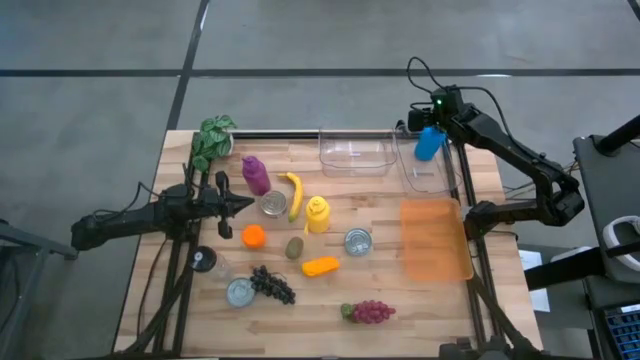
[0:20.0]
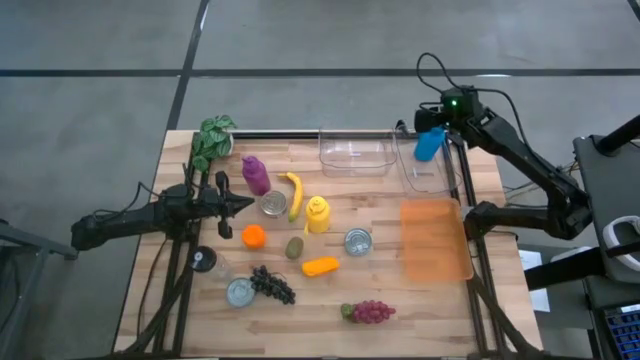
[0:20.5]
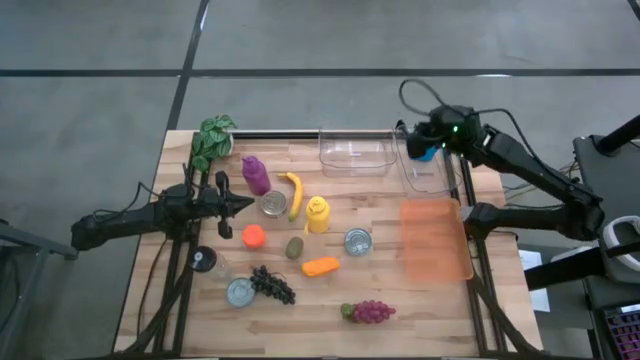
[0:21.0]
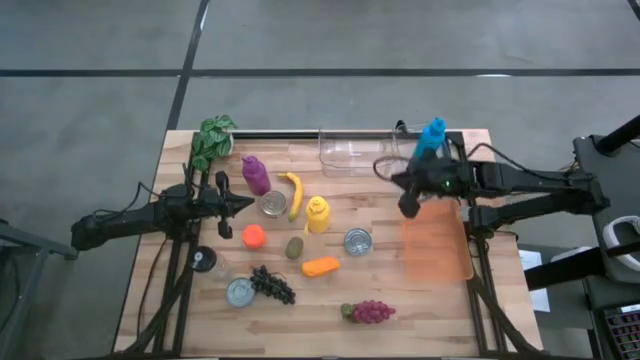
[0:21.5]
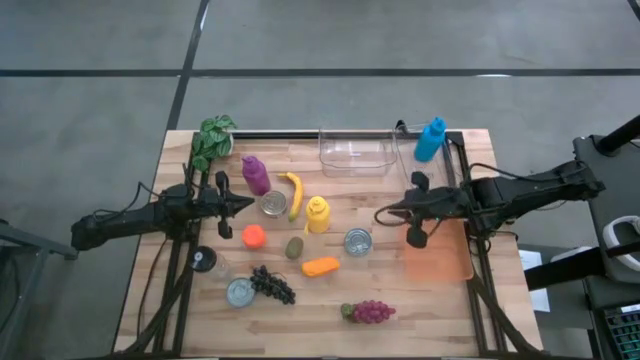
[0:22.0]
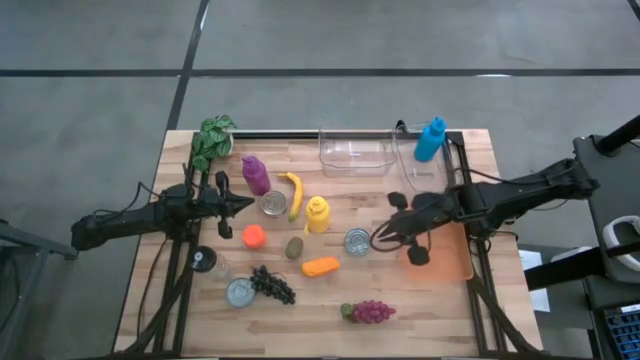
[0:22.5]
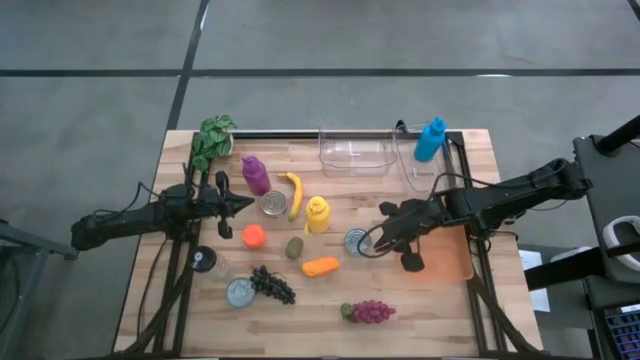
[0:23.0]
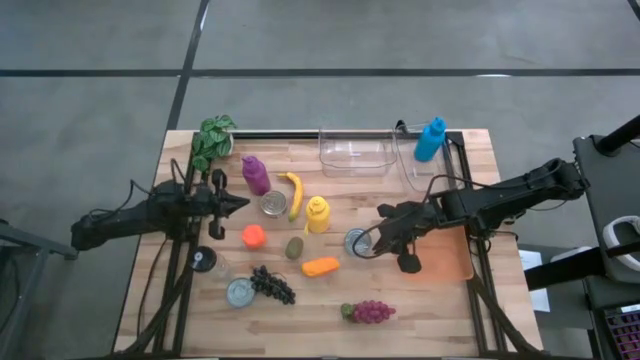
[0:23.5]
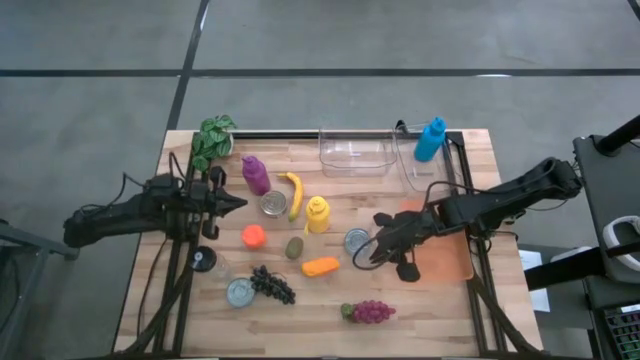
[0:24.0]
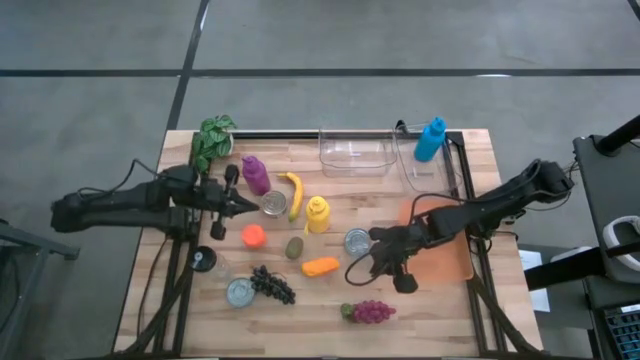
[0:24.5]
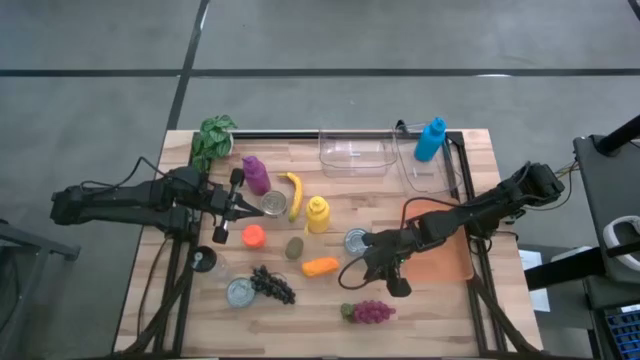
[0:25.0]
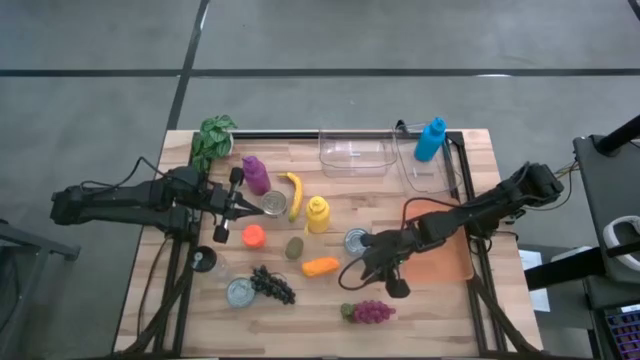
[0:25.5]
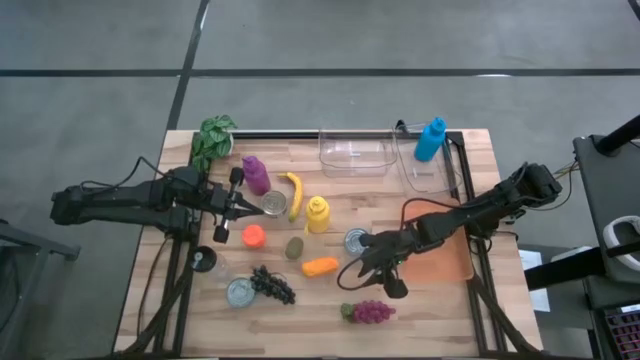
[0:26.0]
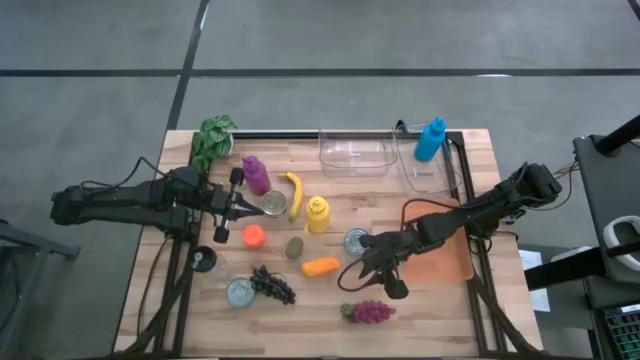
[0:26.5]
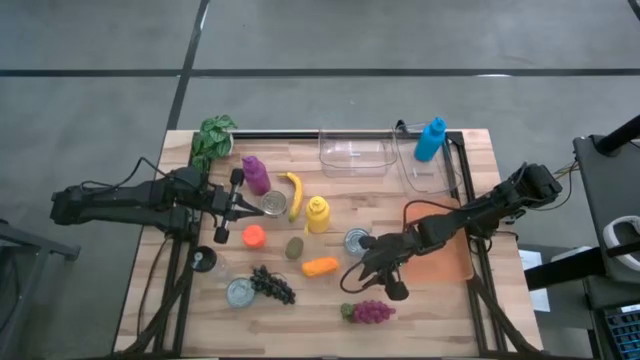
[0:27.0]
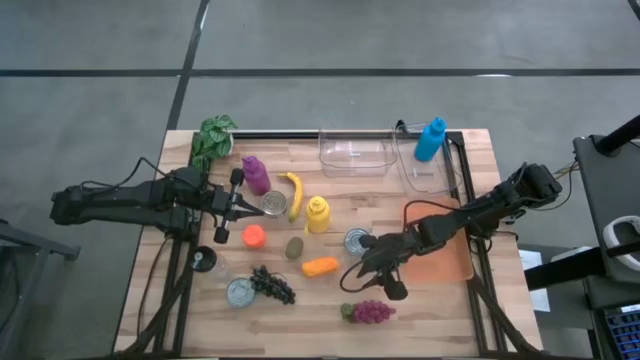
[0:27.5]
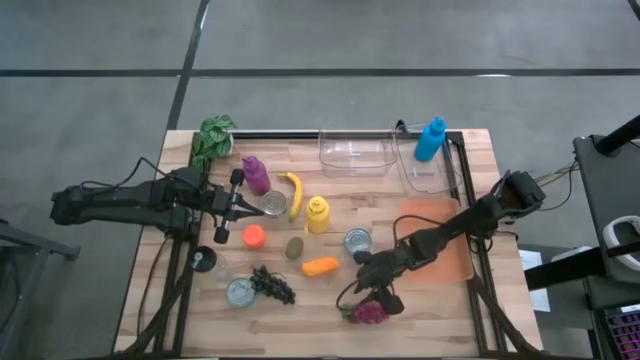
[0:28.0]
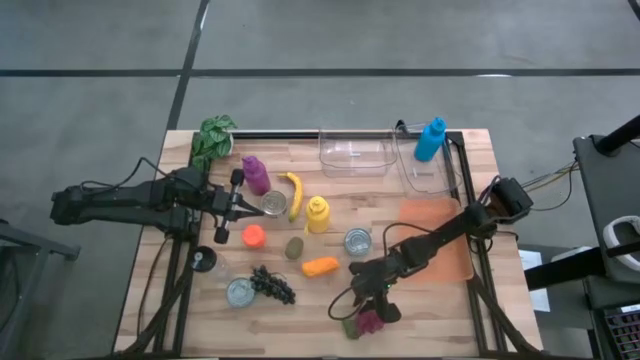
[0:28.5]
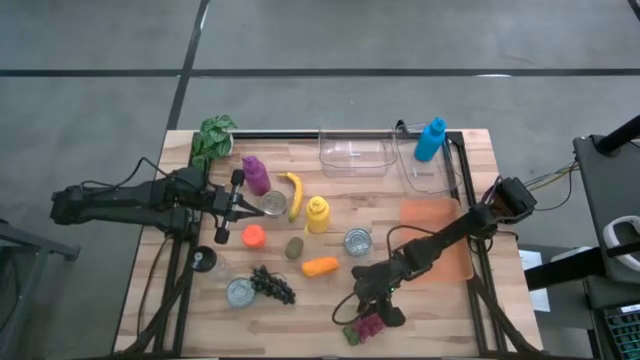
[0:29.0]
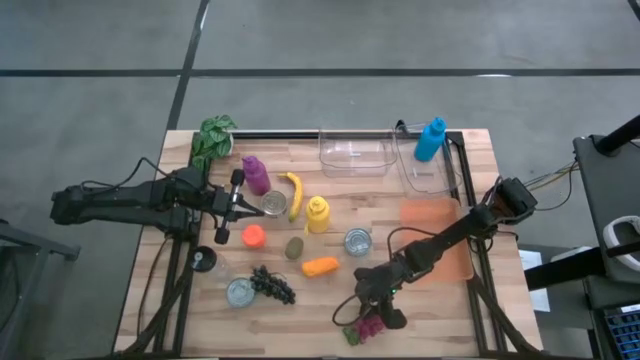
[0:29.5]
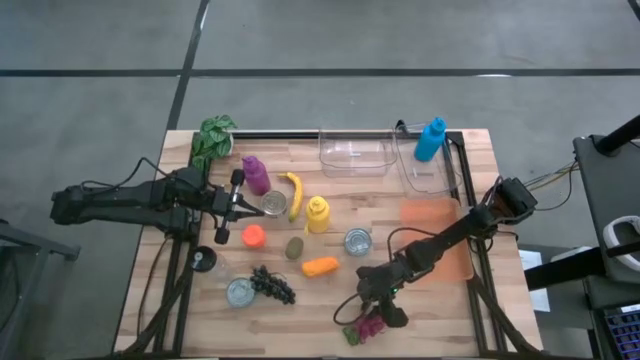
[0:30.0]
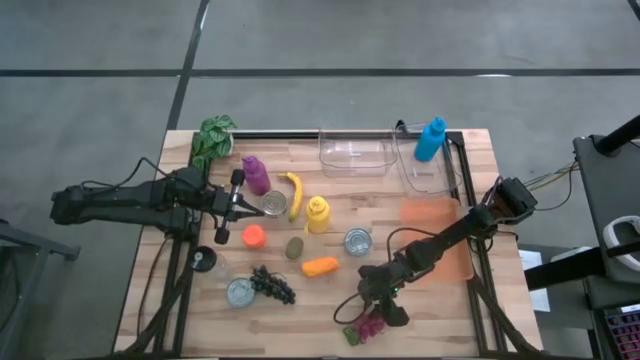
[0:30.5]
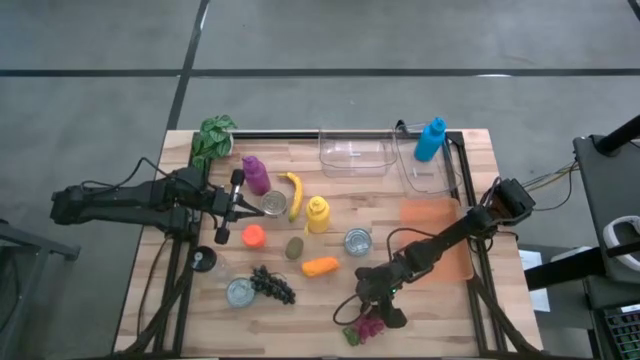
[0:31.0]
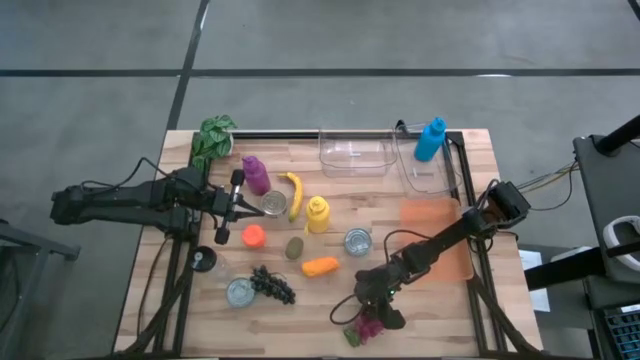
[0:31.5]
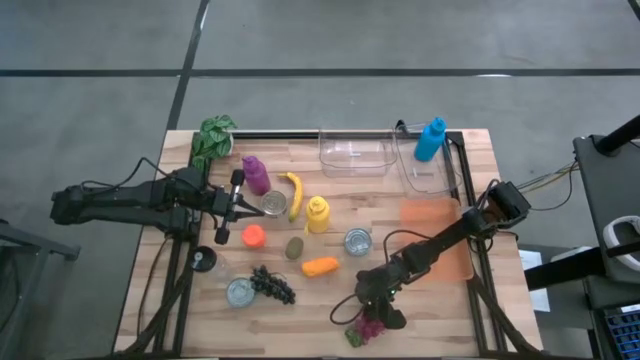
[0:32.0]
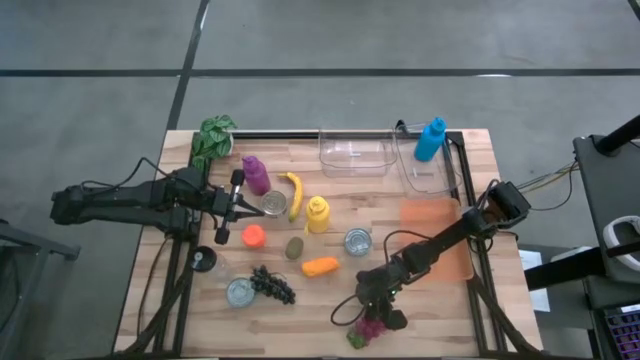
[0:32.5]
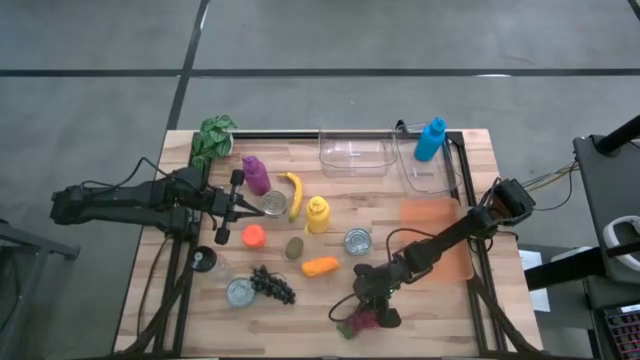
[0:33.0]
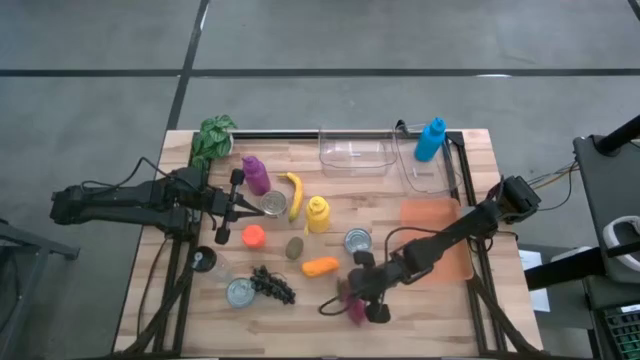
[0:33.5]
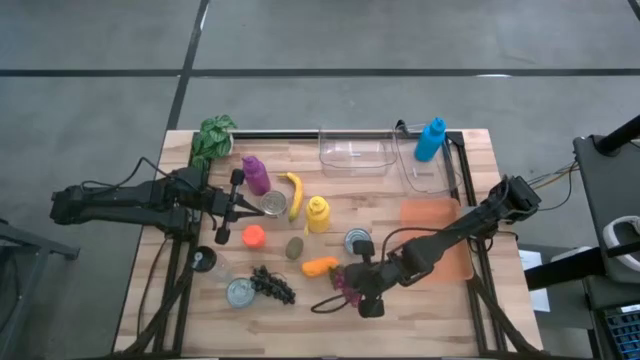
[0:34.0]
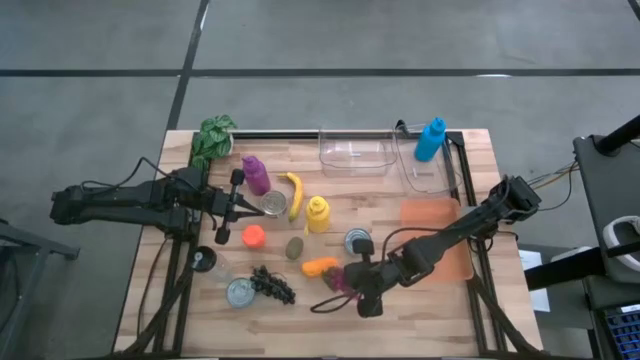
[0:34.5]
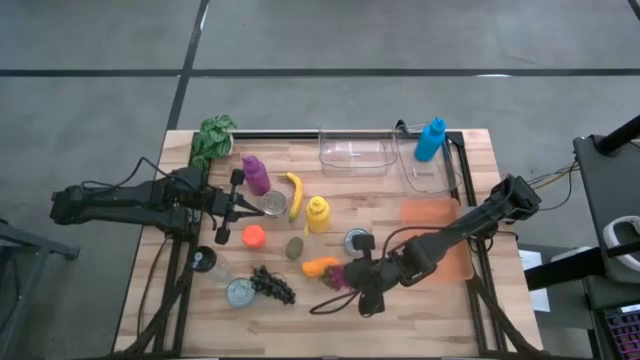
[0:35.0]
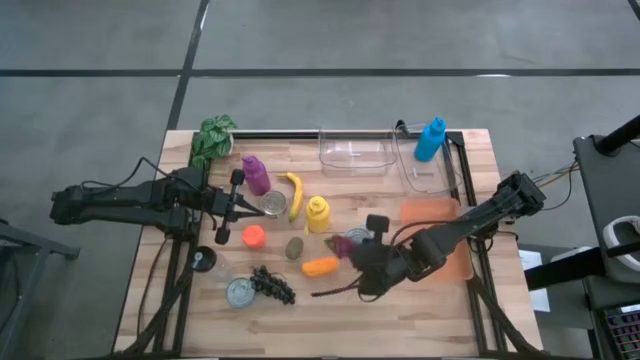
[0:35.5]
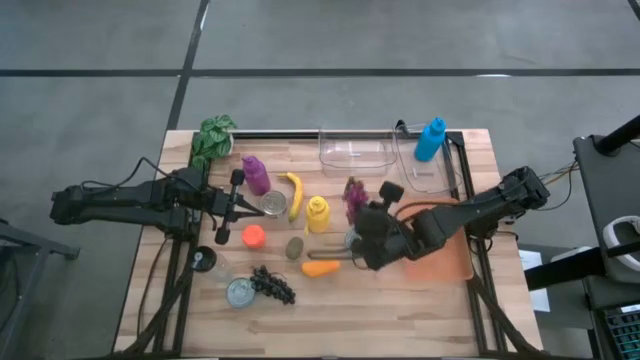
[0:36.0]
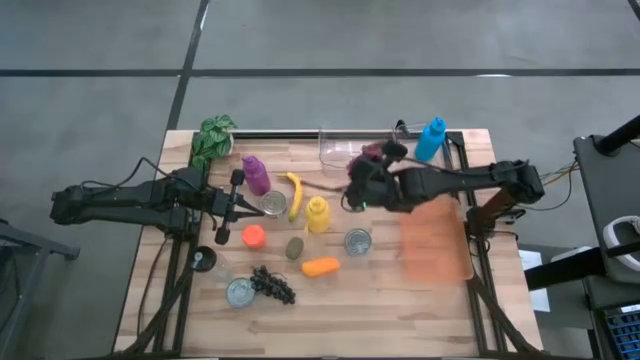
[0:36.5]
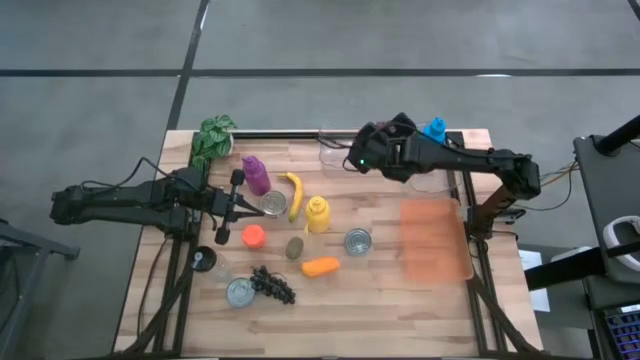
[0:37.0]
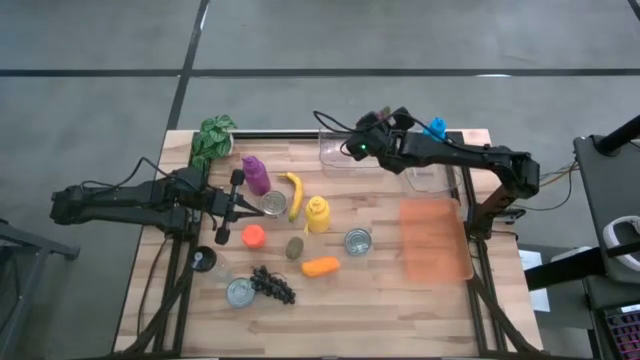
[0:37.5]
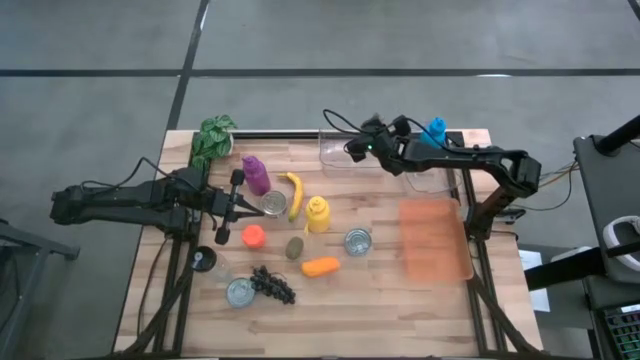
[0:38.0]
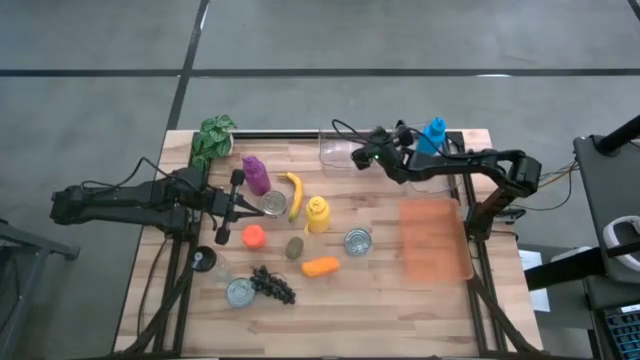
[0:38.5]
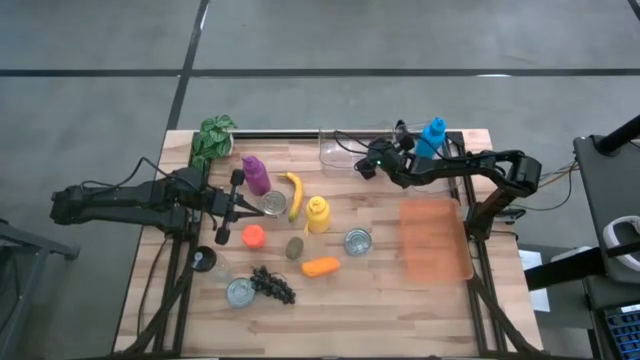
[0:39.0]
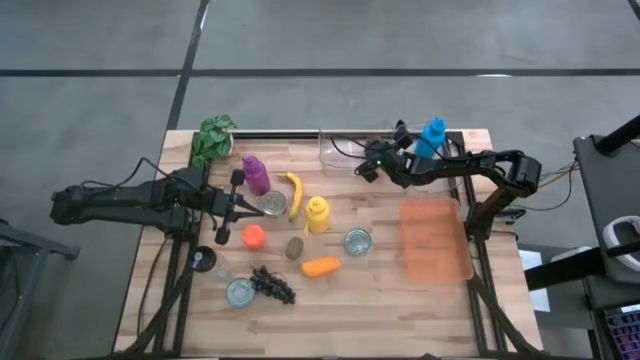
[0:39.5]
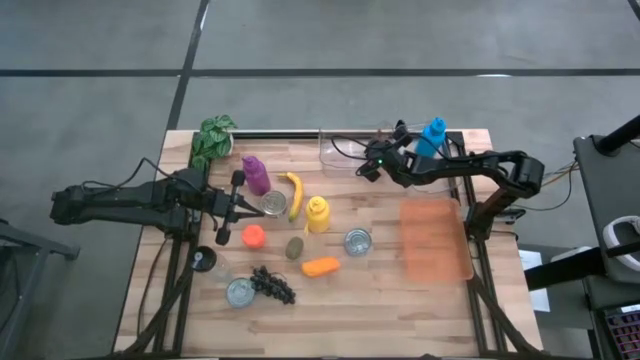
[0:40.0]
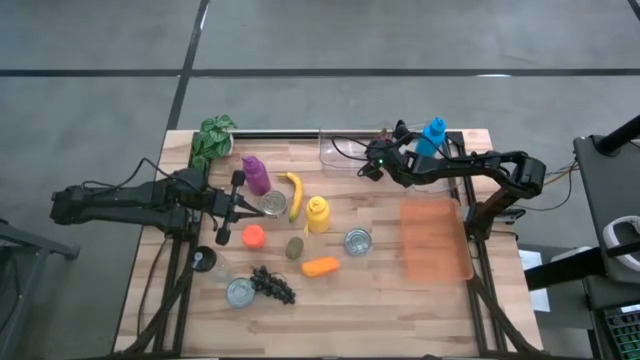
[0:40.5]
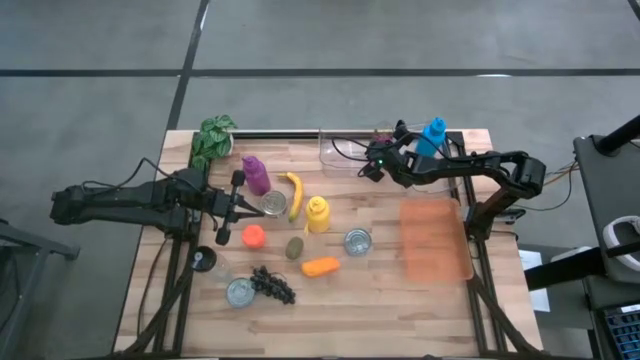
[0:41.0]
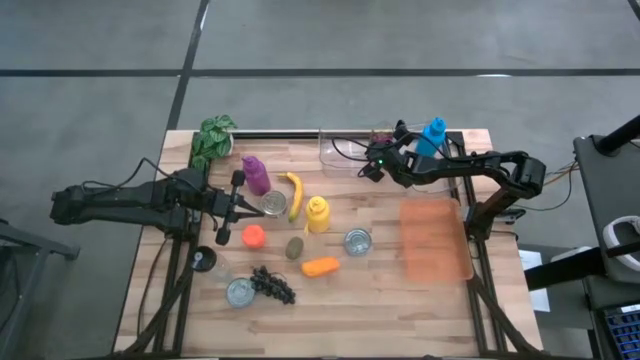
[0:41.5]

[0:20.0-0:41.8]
Task: Pick & Place Food Item
Put the red grapes into the left transparent bin
